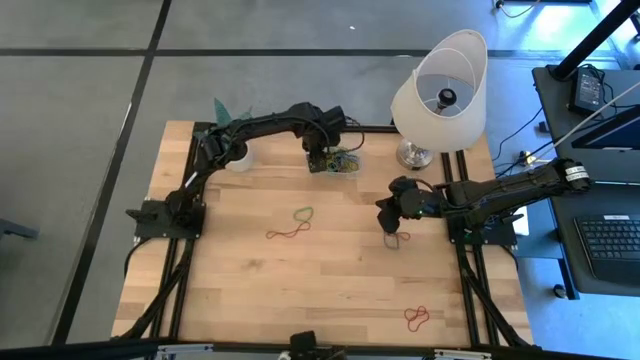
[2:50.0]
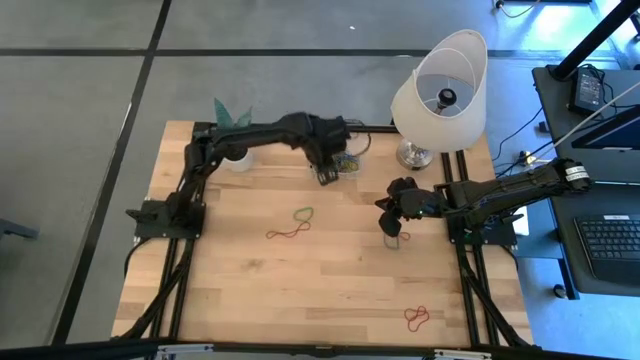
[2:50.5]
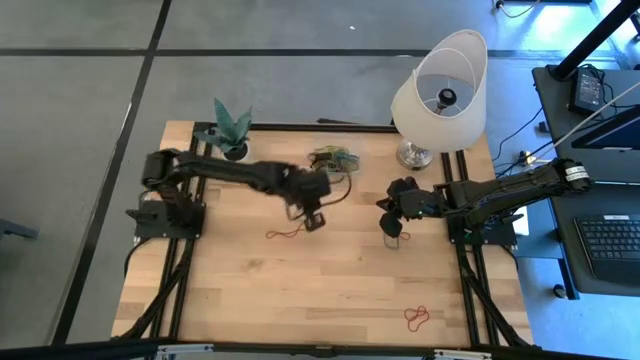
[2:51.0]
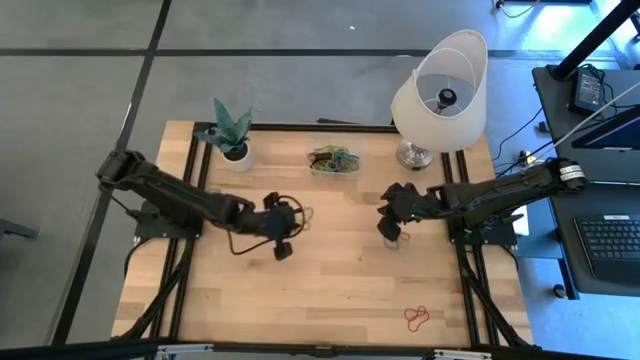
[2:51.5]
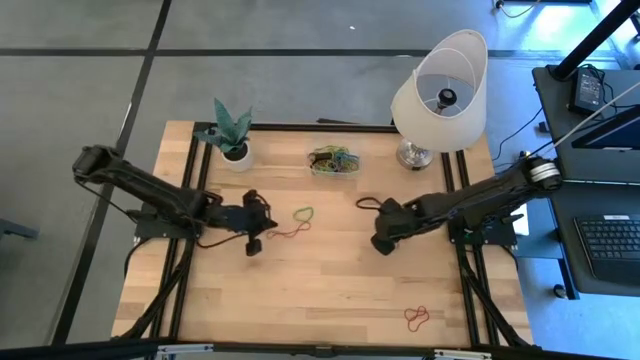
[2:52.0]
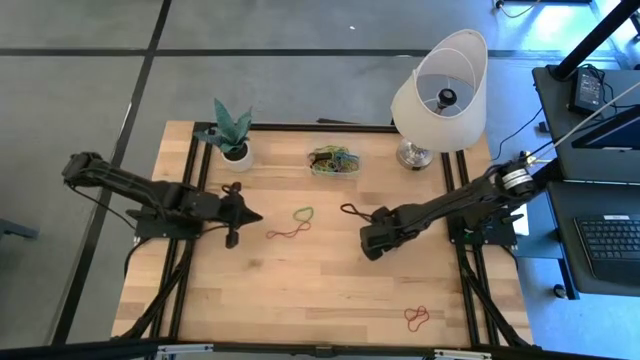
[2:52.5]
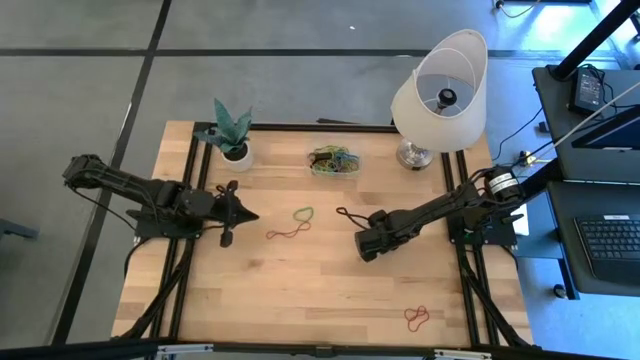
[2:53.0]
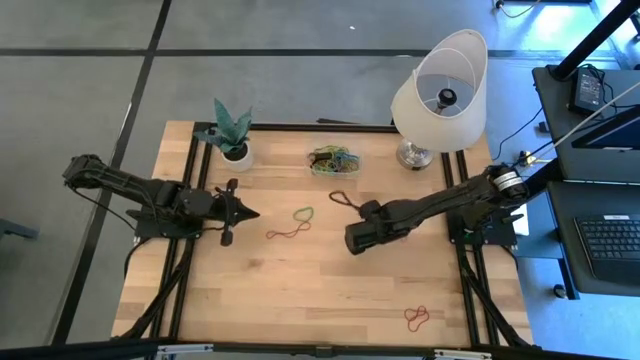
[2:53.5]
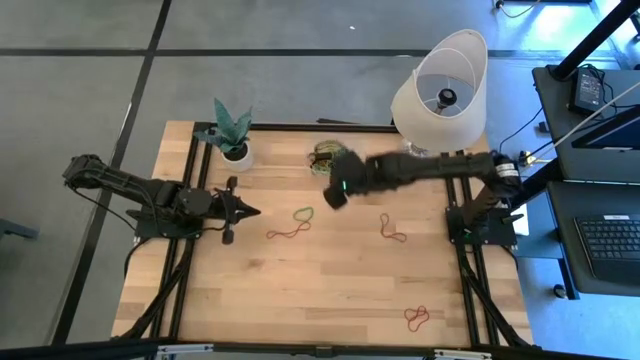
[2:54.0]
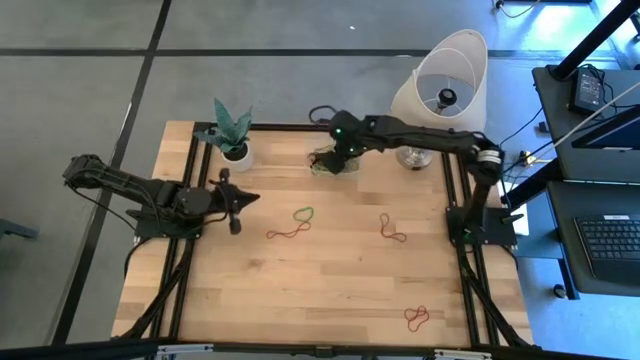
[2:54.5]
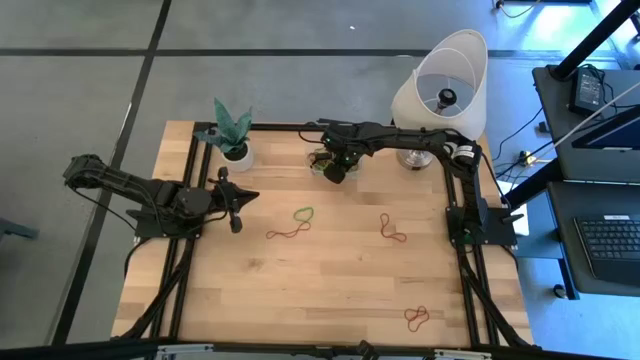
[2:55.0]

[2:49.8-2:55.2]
Task: Pick and place rubber bands into bin
Put the blue rubber band into the transparent bin

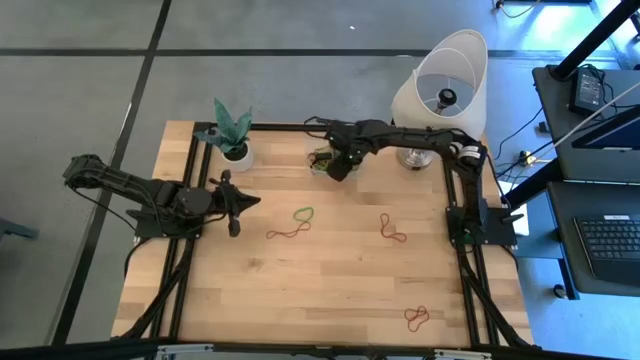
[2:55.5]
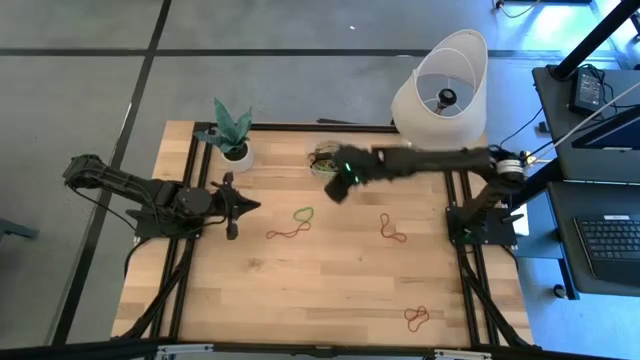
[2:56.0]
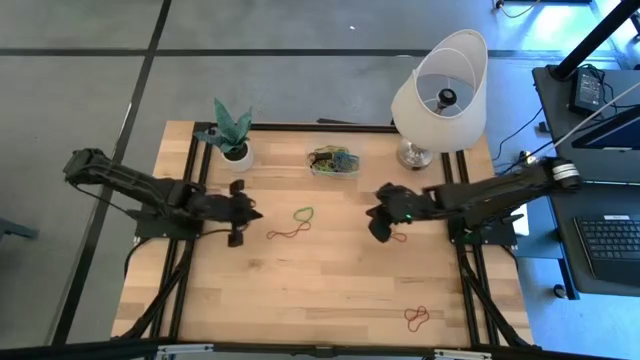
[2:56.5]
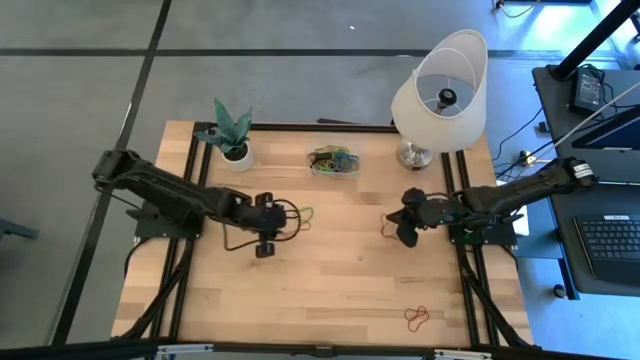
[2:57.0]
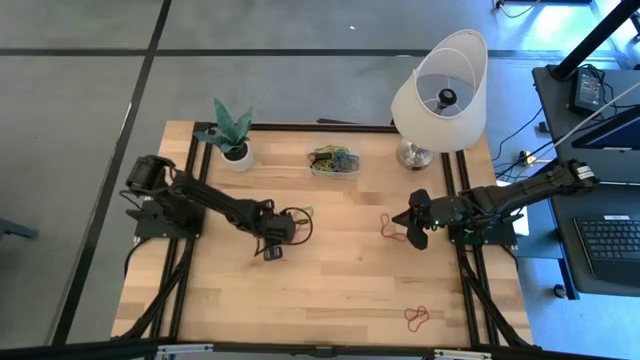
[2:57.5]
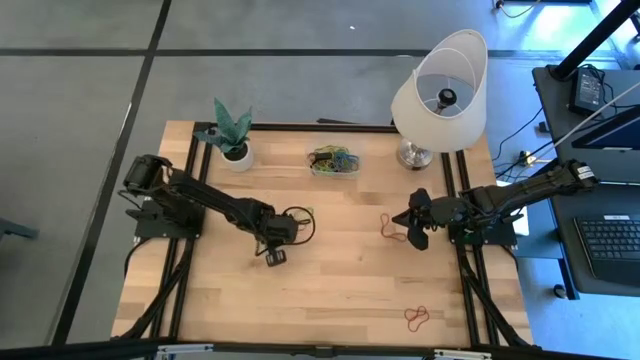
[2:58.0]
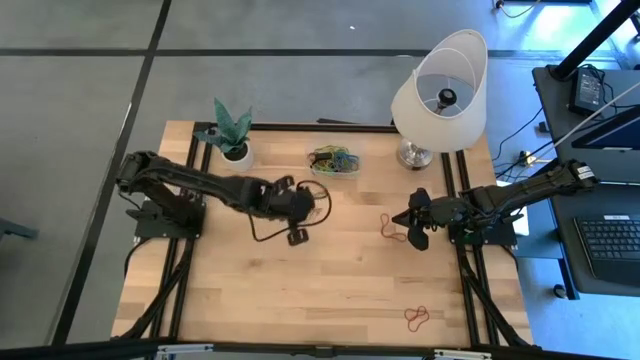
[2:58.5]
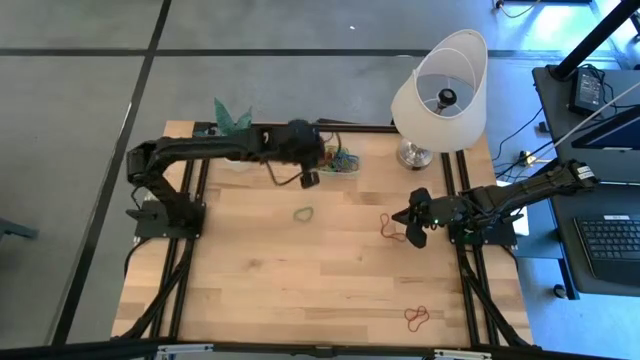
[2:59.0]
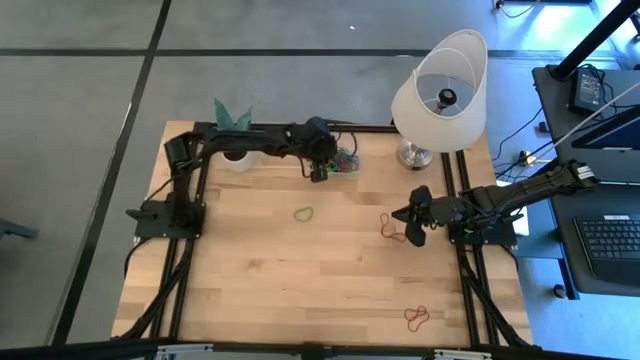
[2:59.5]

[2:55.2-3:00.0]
Put the red rubber band into the transparent bin

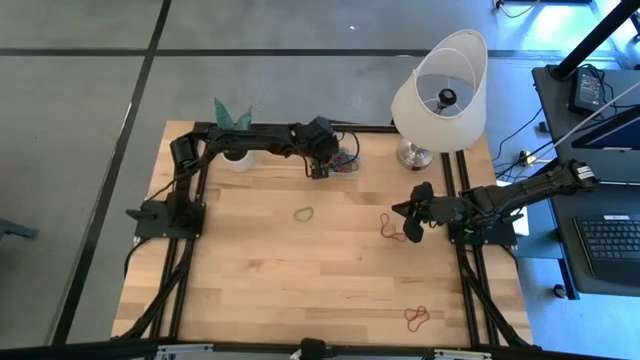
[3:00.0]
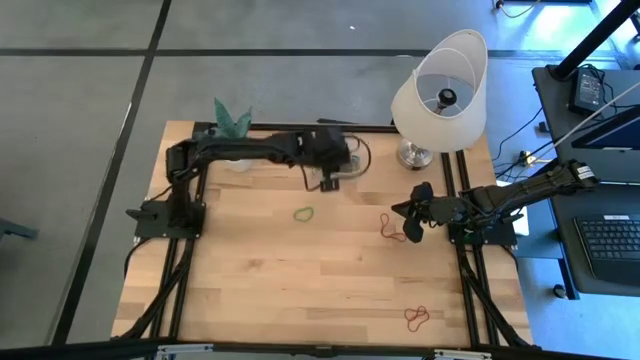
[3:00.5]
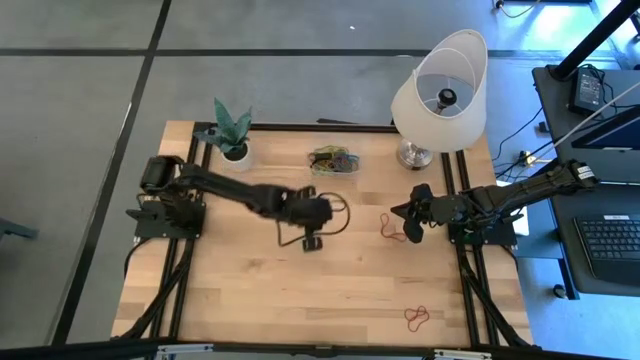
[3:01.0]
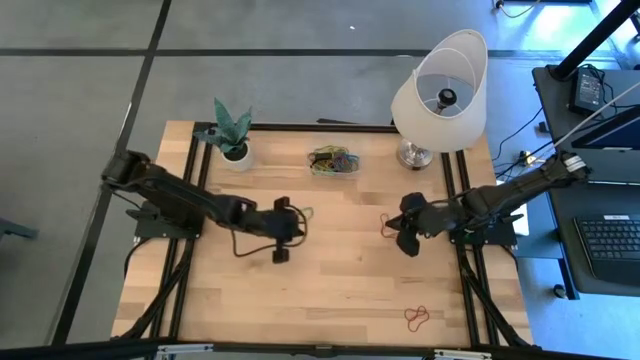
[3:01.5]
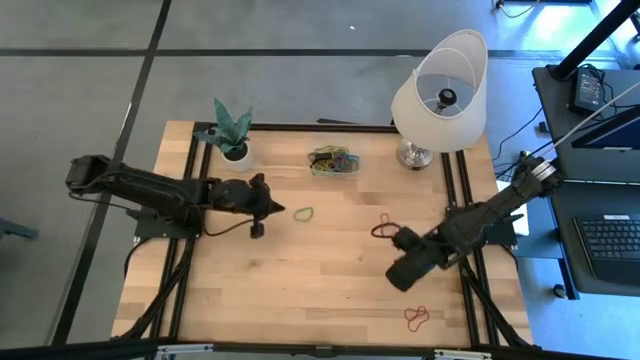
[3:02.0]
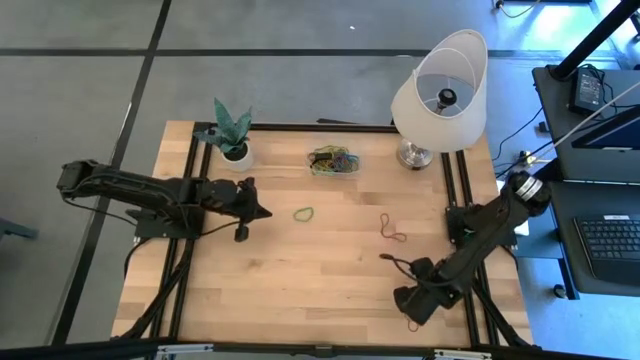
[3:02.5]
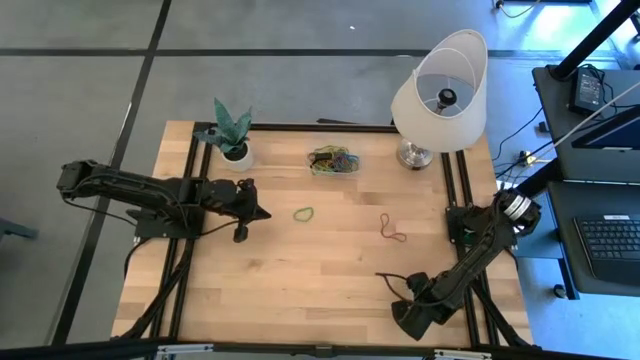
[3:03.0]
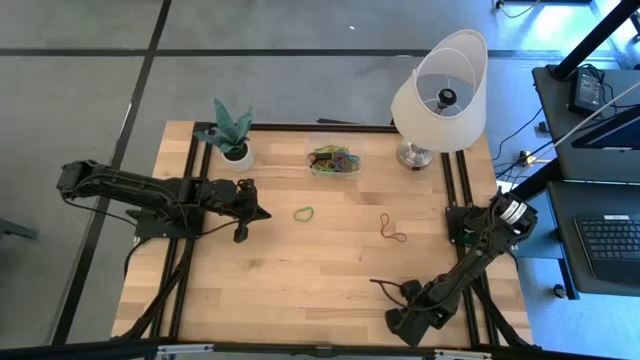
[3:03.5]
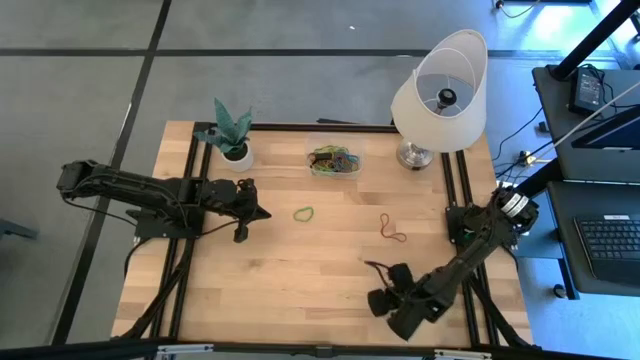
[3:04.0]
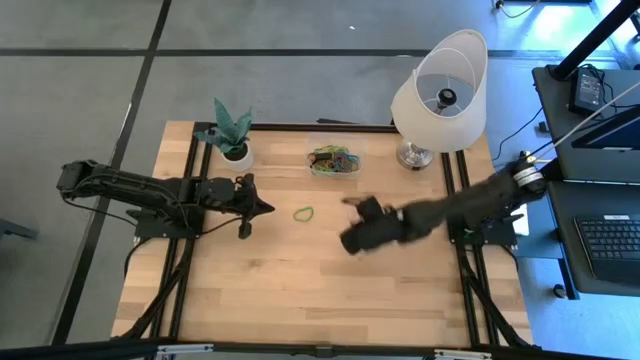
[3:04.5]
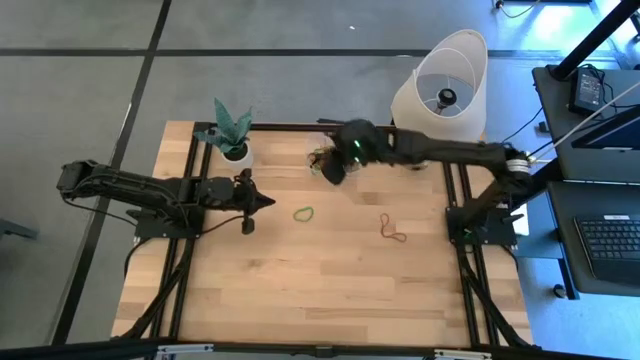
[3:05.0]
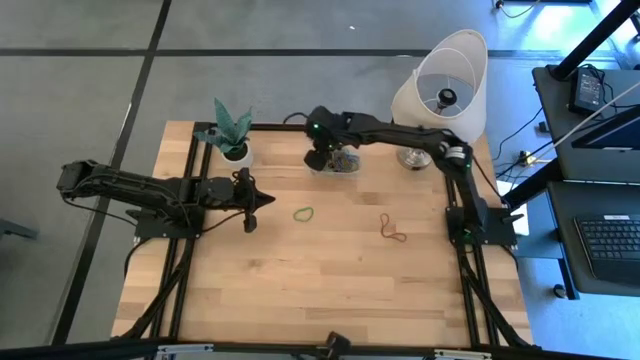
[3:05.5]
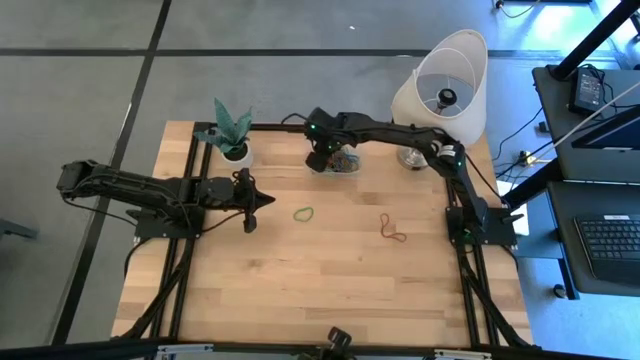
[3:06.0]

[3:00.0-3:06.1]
Put the red rubber band into the transparent bin

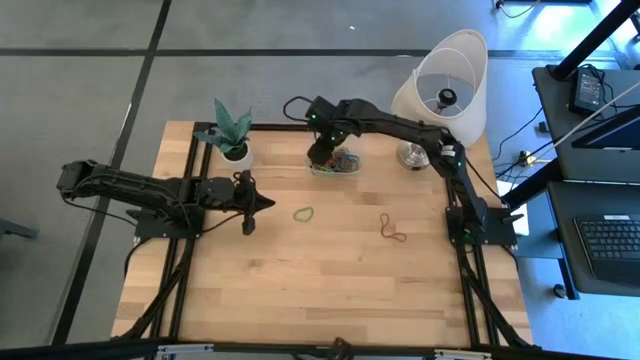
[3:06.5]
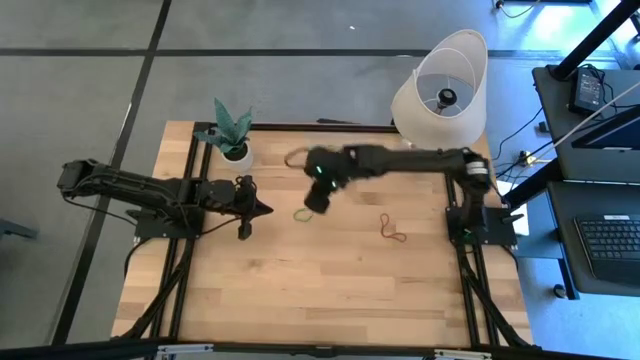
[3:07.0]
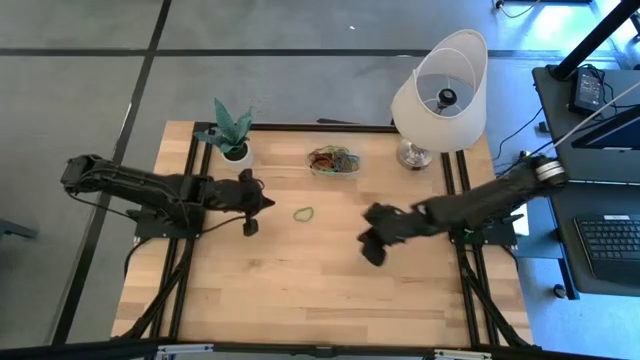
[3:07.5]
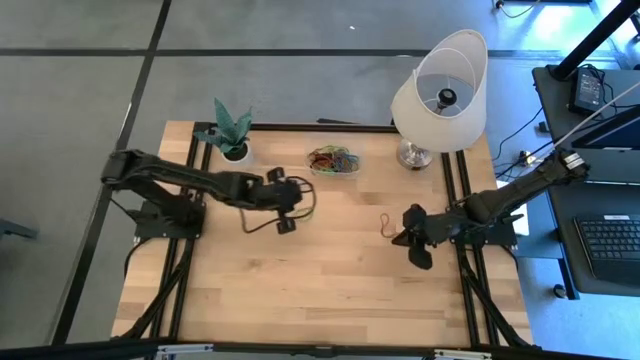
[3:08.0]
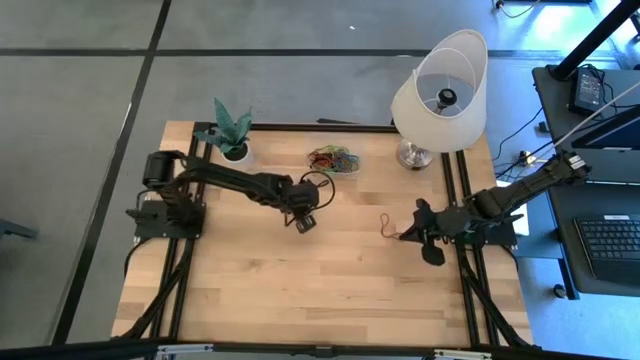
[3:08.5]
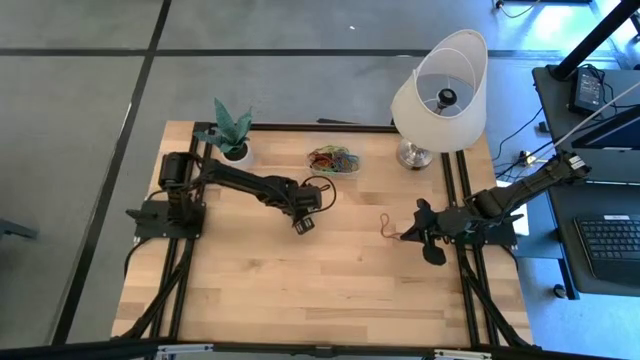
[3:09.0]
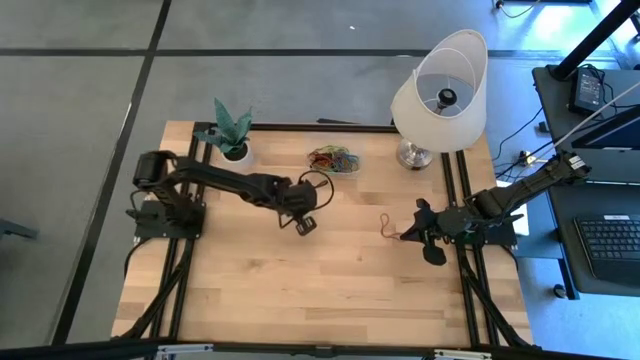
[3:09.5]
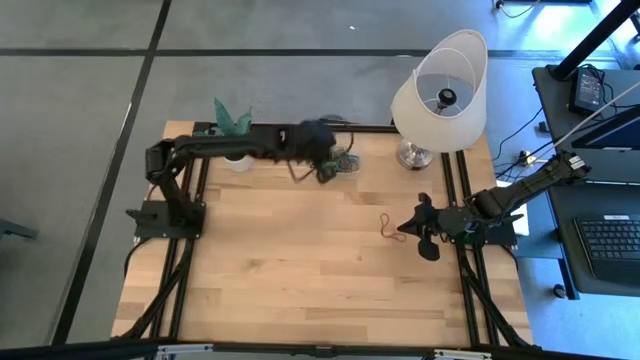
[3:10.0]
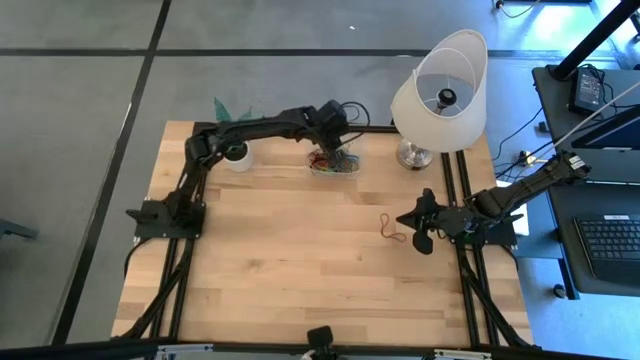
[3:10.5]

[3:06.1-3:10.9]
Put the green rubber band into the transparent bin
